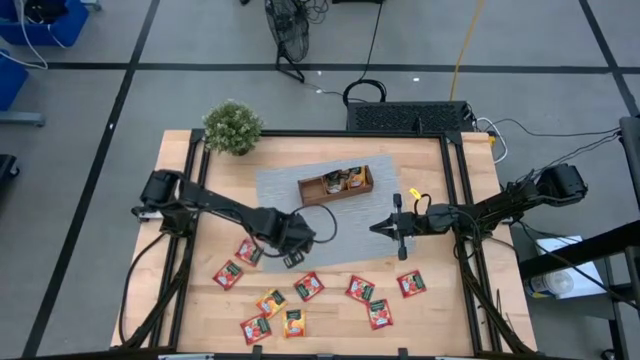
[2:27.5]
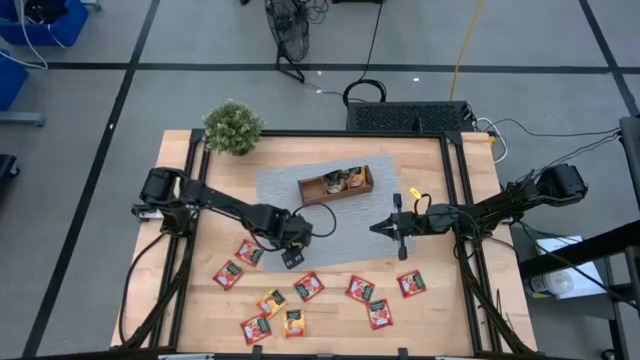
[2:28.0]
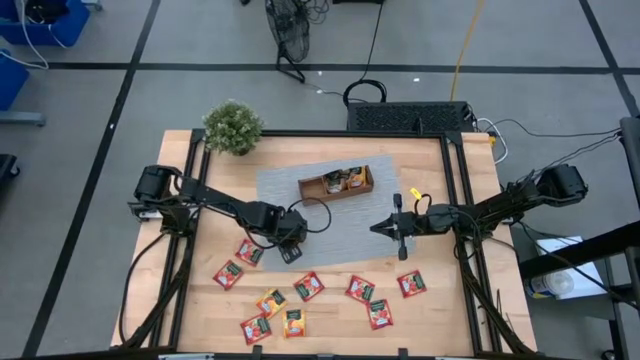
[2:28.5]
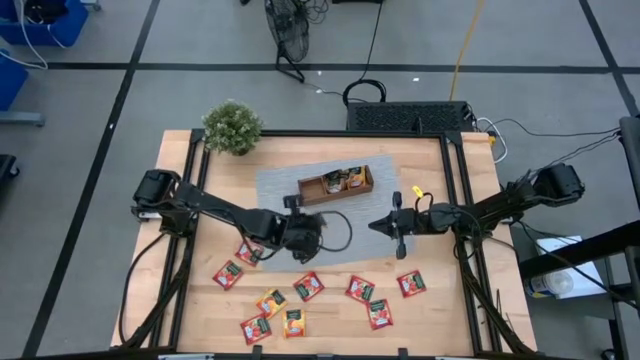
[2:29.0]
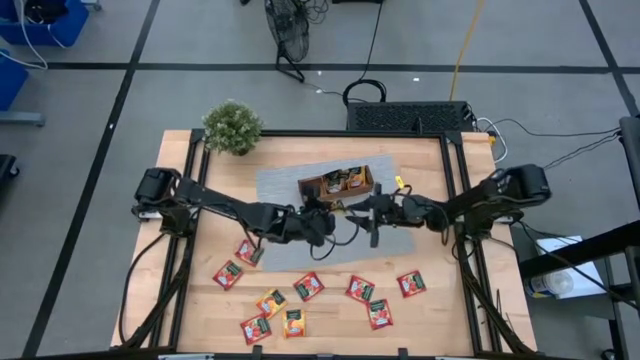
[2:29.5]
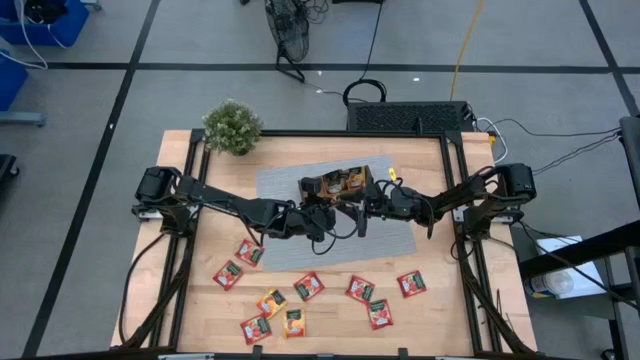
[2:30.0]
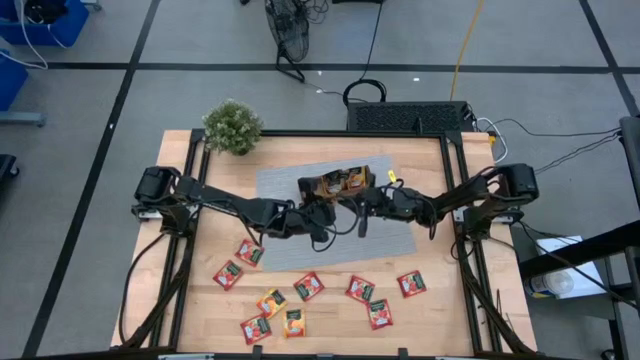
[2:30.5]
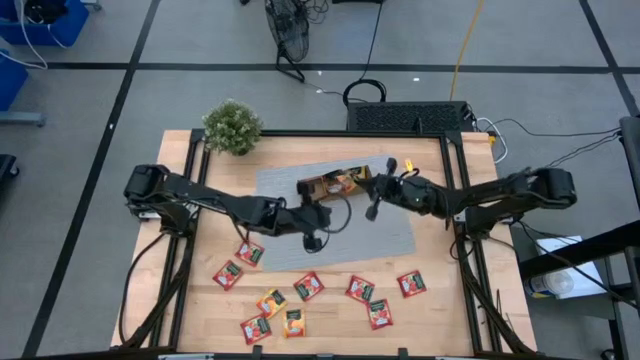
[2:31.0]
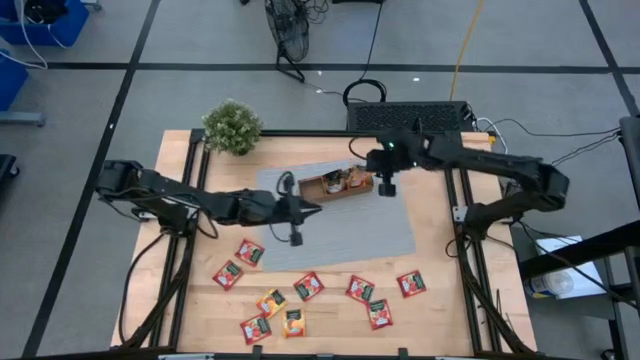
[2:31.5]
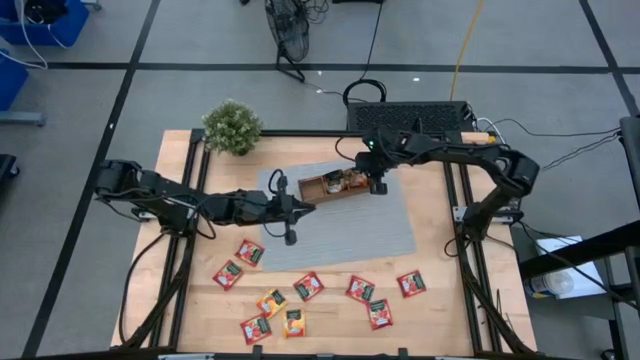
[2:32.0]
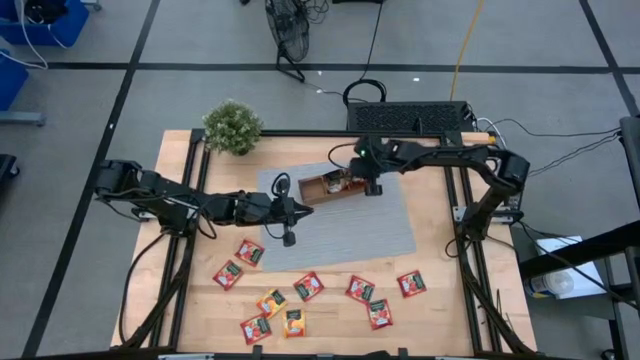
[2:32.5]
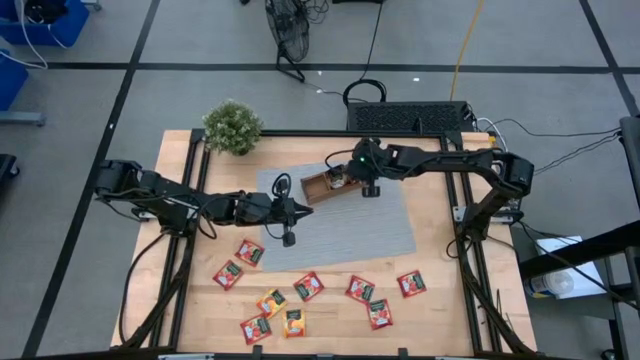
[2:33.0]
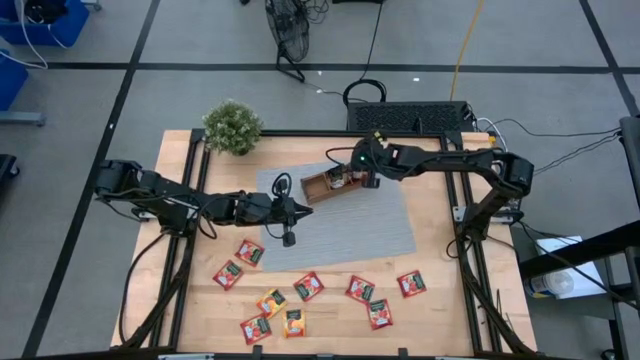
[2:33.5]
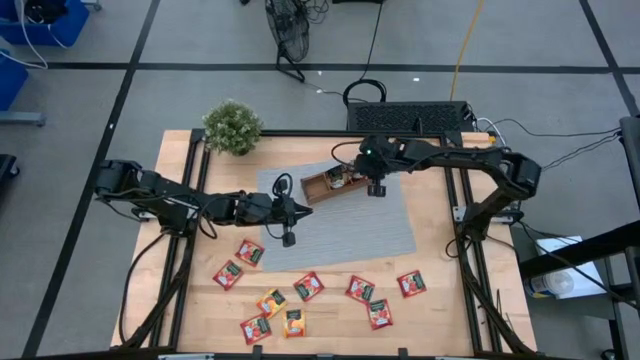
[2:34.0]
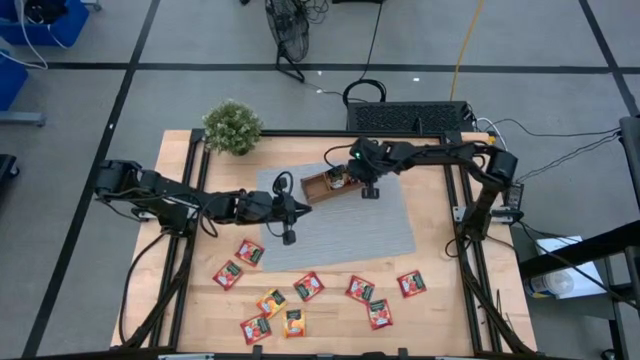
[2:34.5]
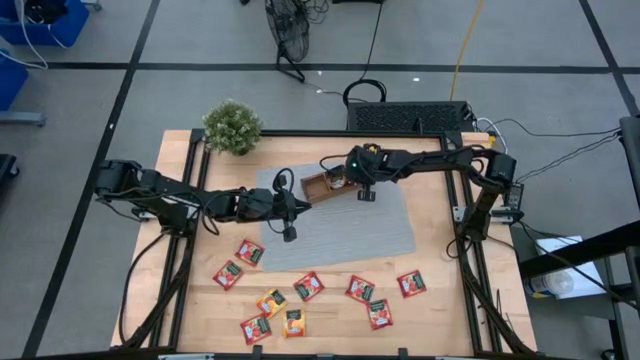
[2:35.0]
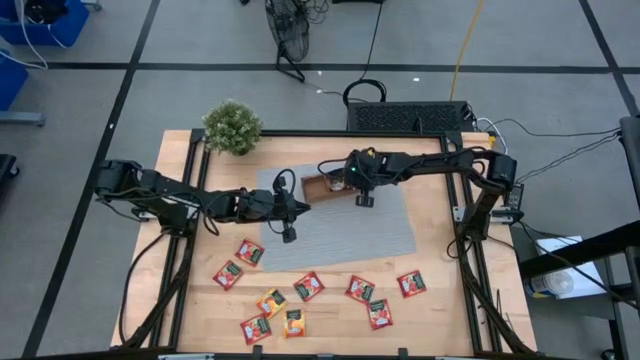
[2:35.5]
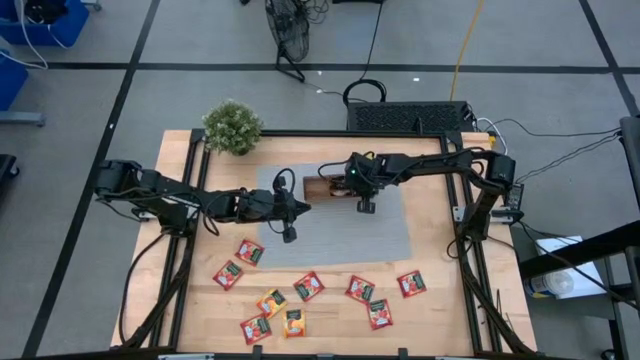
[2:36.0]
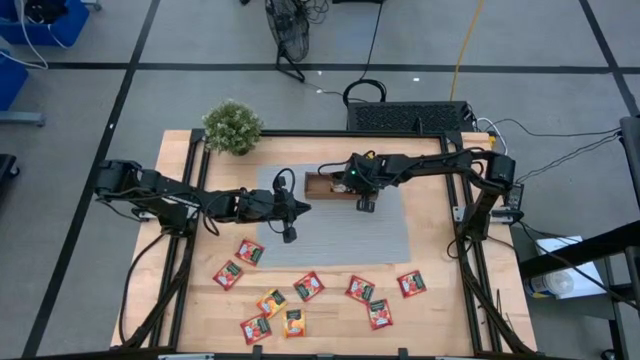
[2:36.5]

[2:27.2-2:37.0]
Task: Pick & Place Tea
Put the yellow tea bag into the right section of the wooden organizer

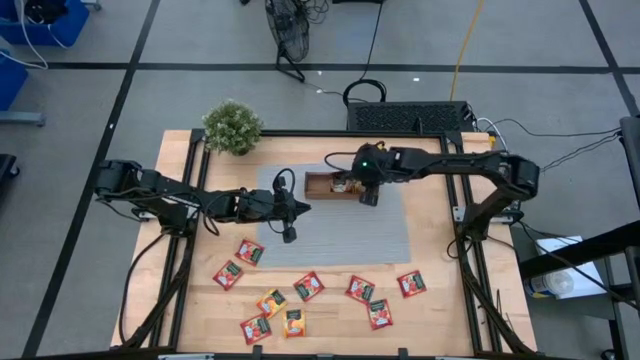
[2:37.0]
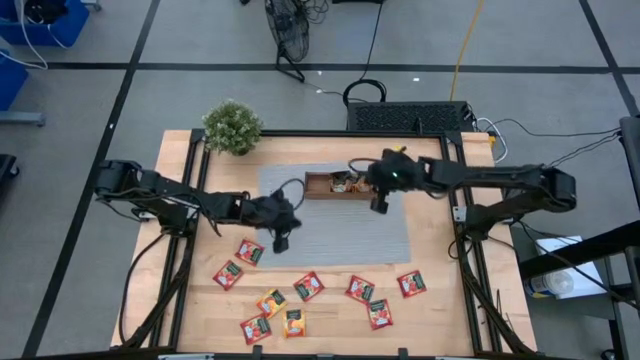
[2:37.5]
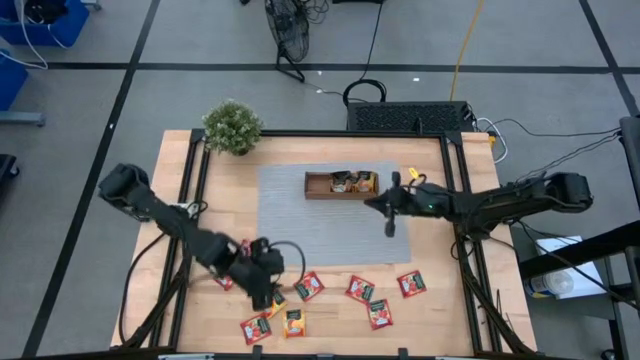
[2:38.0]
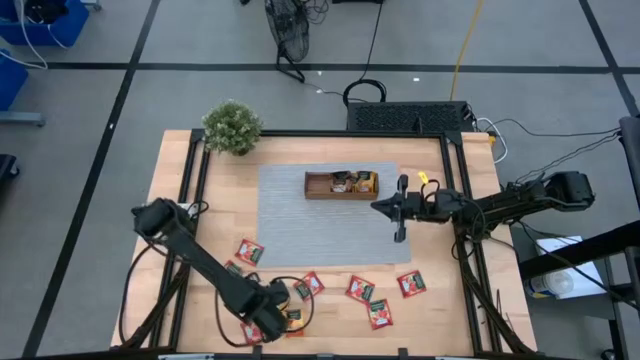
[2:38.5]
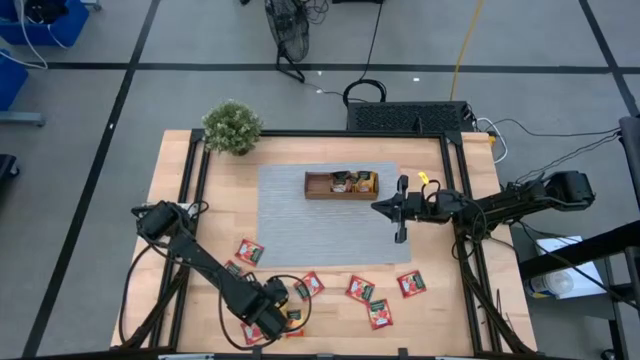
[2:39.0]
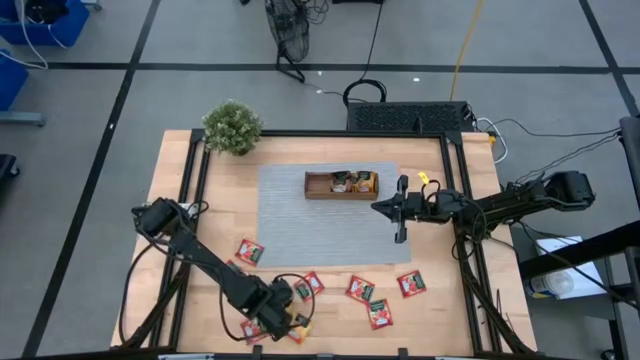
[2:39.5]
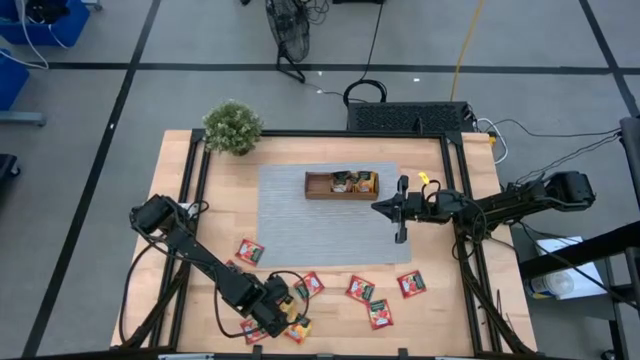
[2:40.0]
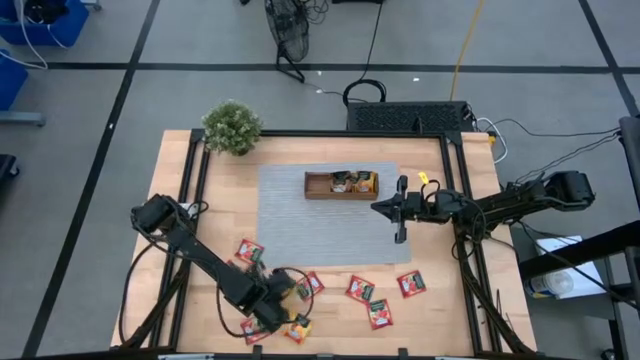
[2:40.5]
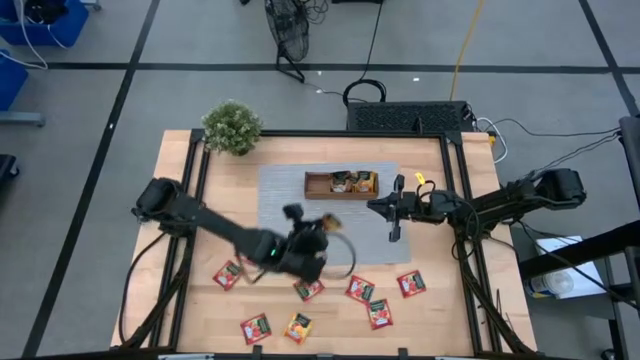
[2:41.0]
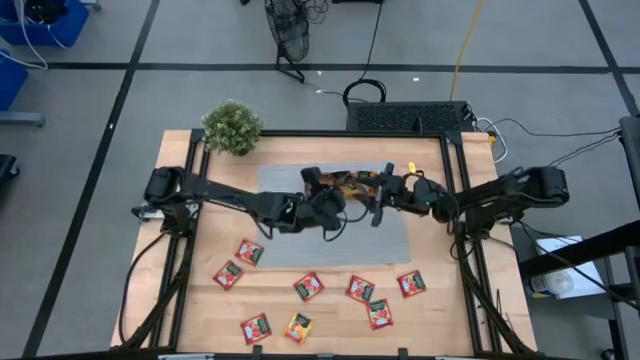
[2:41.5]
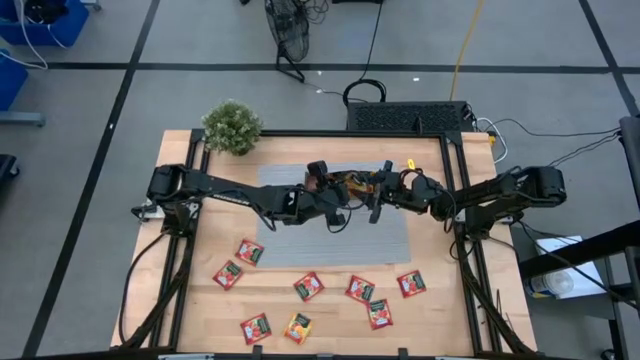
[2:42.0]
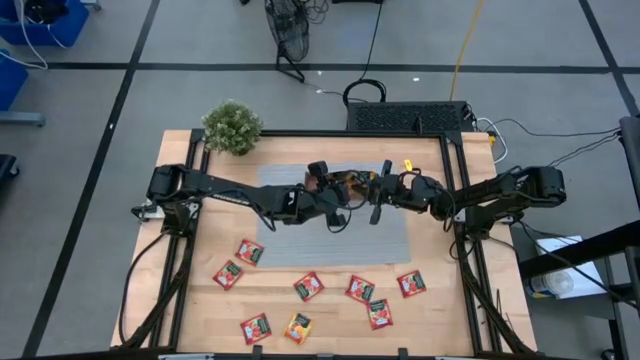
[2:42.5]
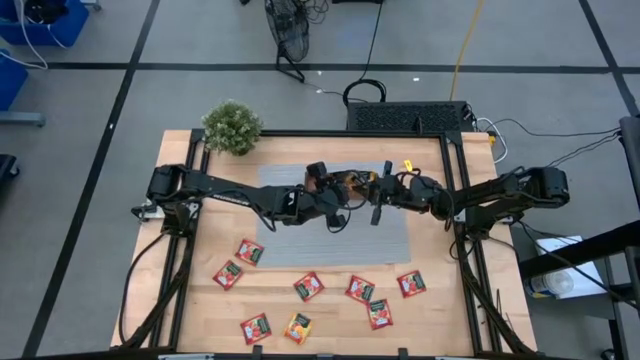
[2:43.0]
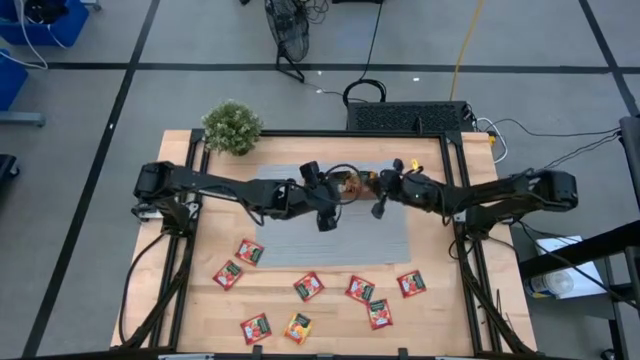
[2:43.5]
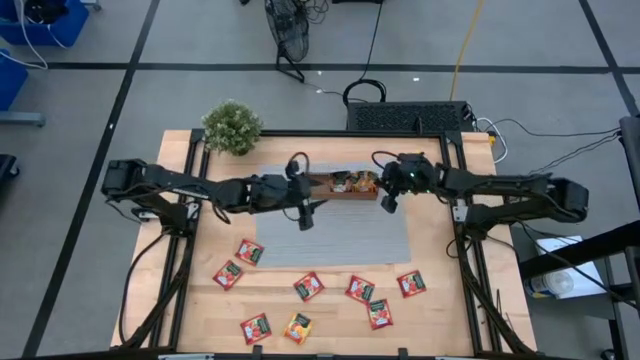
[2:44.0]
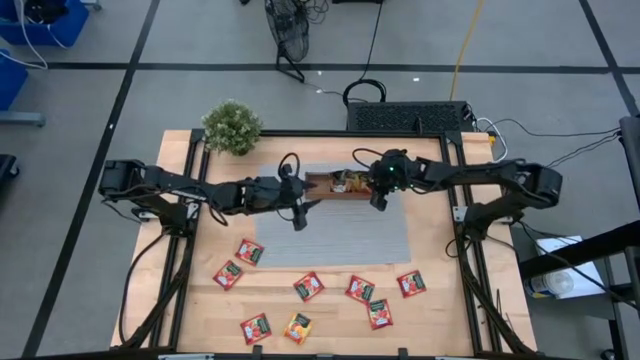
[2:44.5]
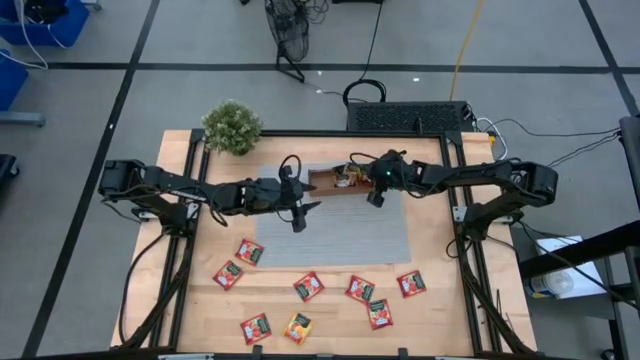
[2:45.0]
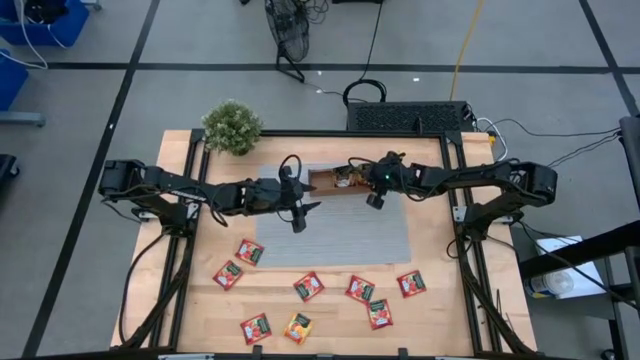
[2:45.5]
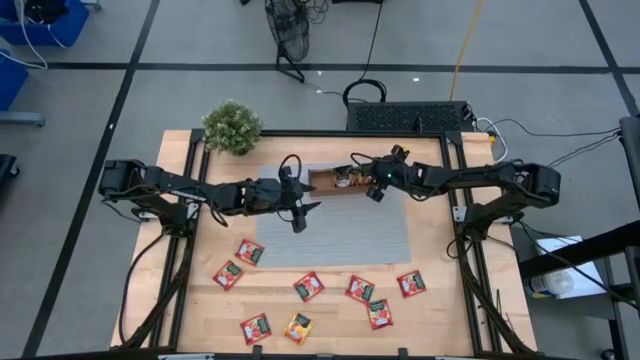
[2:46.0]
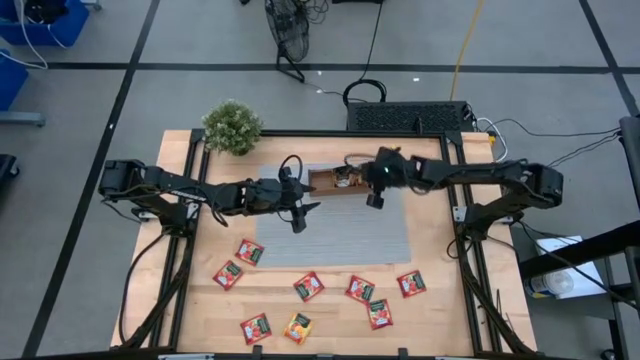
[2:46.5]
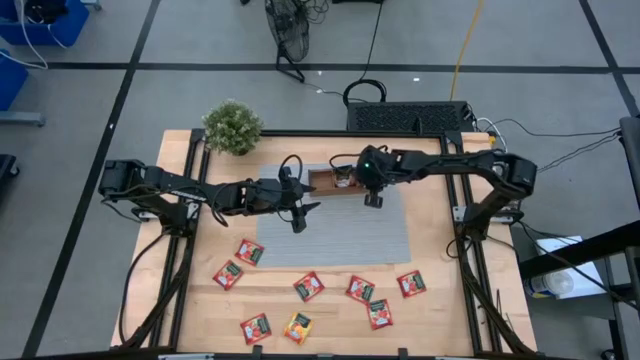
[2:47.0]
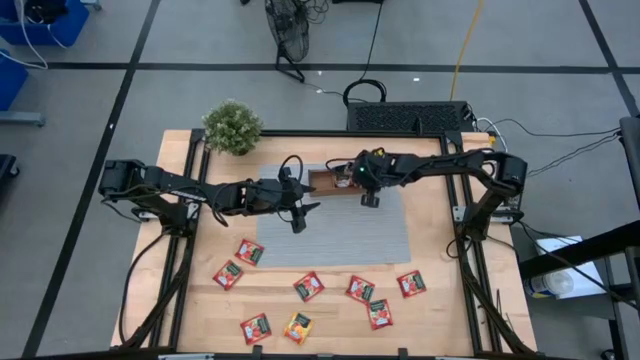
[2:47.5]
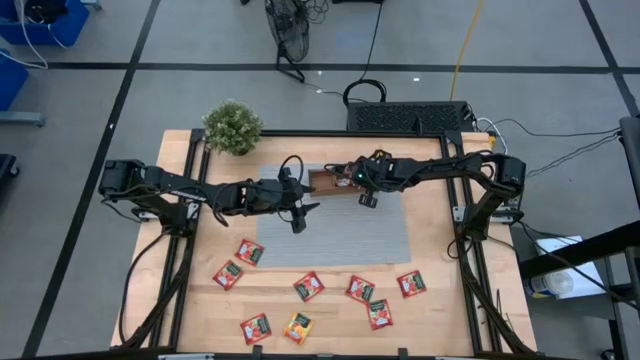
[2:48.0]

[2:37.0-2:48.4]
Put the yellow tea bag into the right section of the wooden organizer

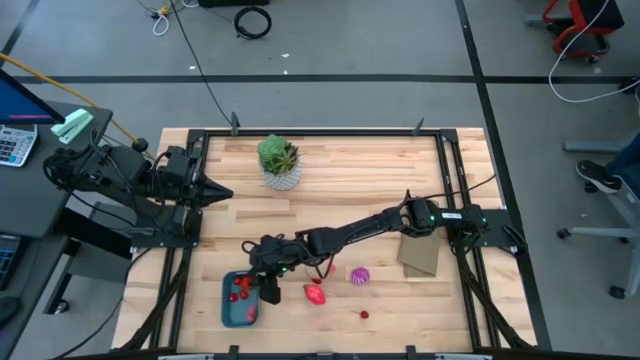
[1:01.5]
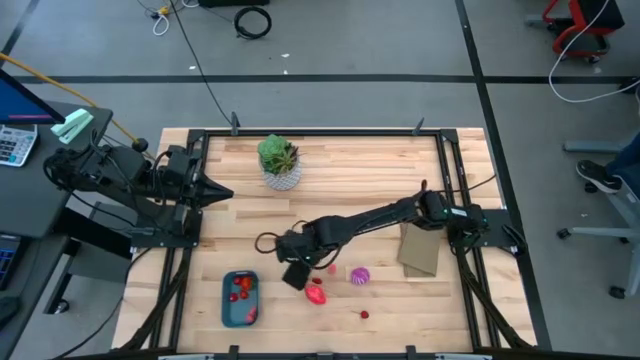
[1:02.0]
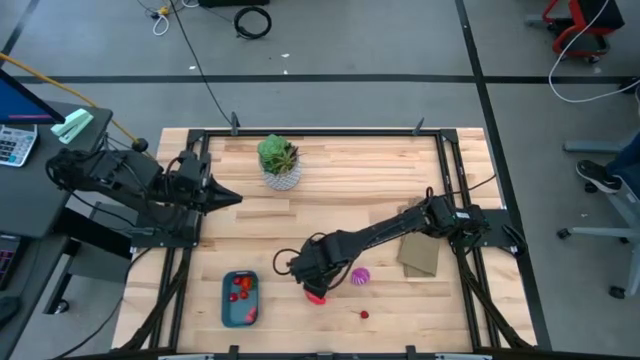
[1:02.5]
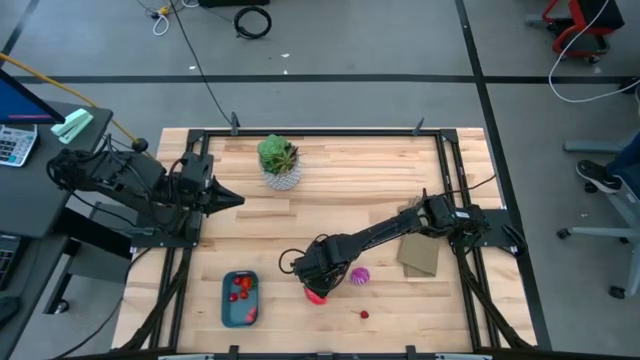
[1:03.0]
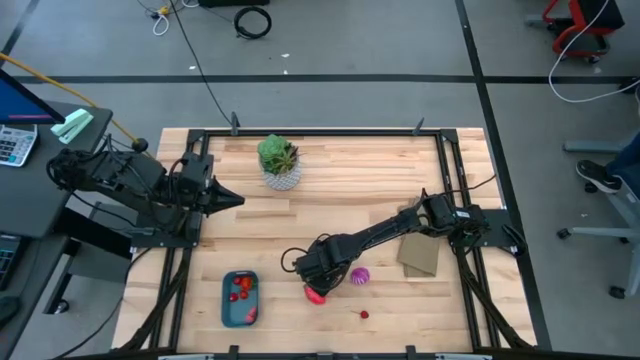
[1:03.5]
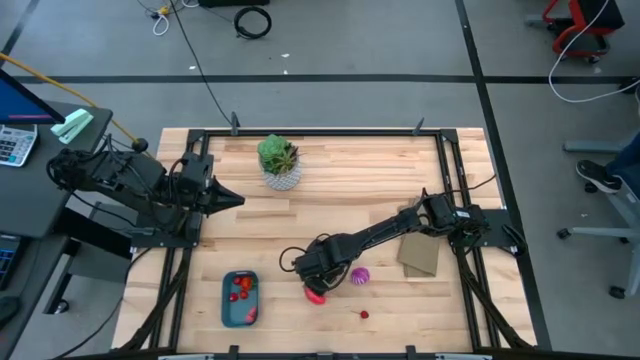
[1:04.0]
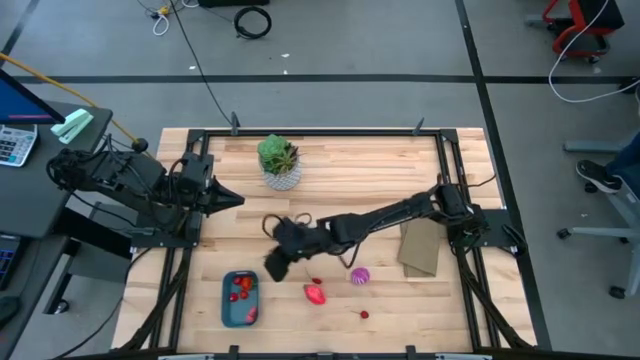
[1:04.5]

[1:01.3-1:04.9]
Task: Pick and placing Produce into tupperware
Put the peach into the bin
